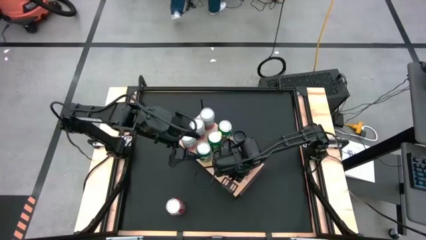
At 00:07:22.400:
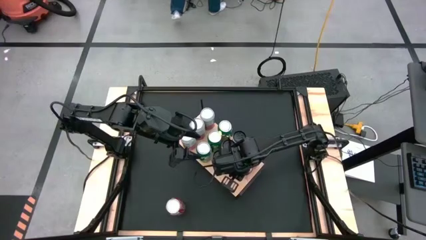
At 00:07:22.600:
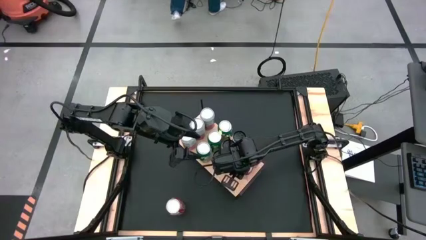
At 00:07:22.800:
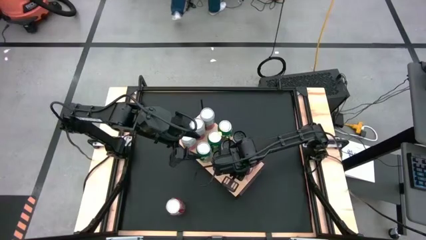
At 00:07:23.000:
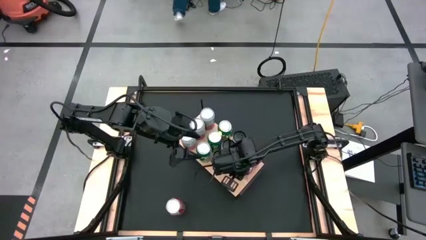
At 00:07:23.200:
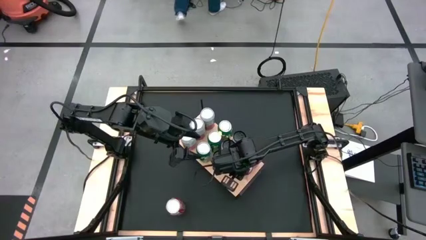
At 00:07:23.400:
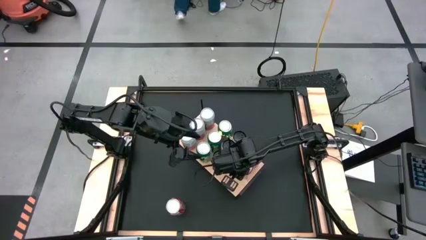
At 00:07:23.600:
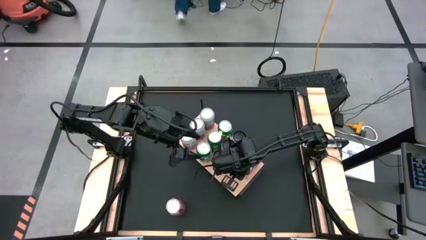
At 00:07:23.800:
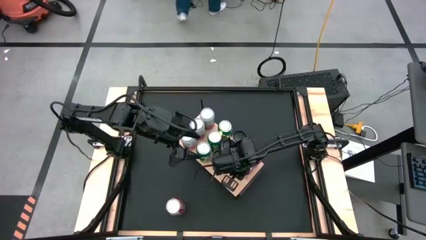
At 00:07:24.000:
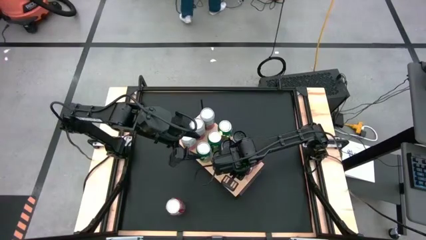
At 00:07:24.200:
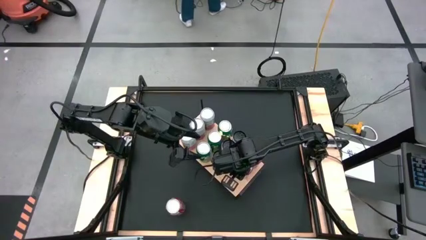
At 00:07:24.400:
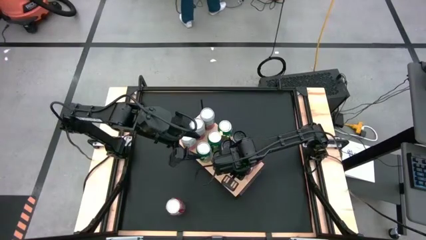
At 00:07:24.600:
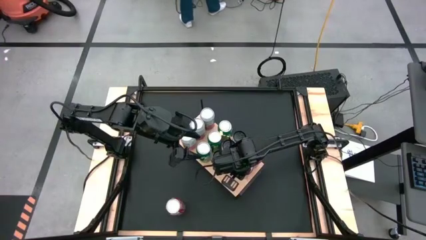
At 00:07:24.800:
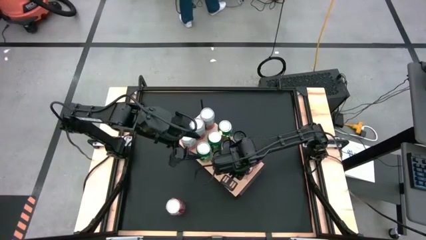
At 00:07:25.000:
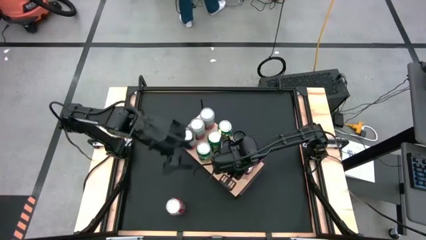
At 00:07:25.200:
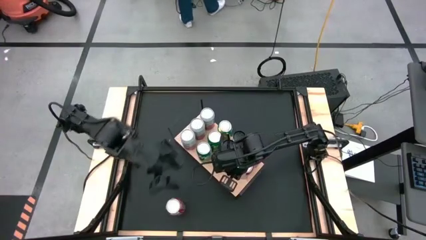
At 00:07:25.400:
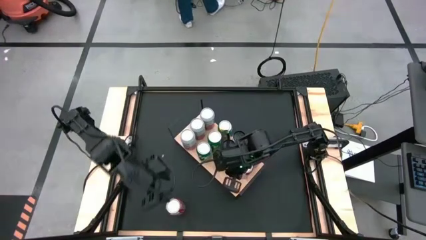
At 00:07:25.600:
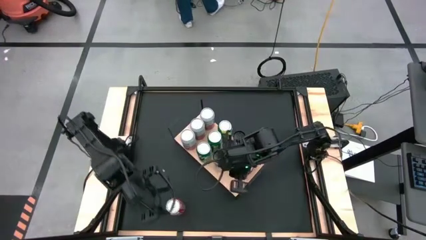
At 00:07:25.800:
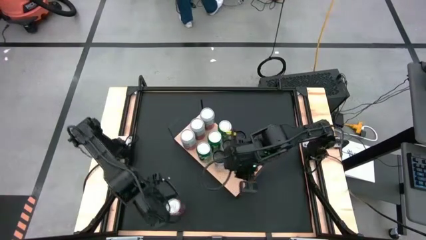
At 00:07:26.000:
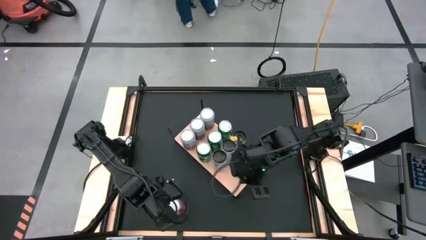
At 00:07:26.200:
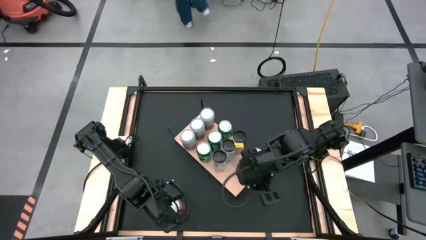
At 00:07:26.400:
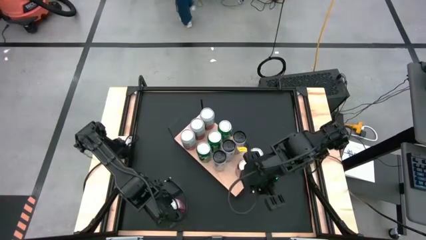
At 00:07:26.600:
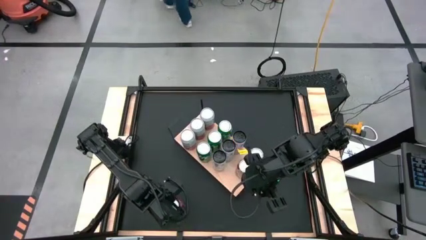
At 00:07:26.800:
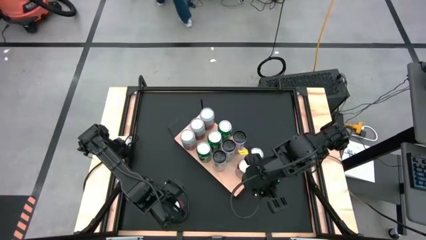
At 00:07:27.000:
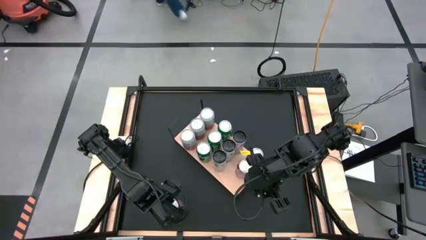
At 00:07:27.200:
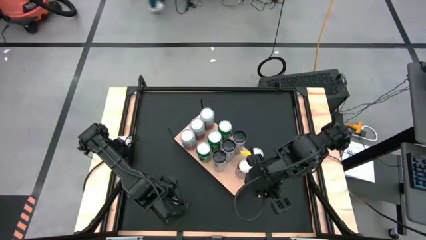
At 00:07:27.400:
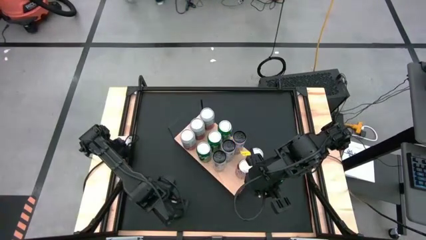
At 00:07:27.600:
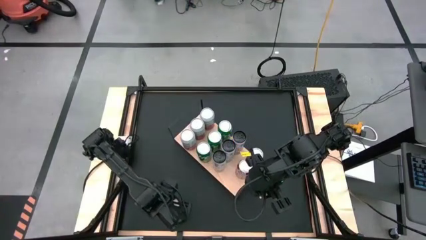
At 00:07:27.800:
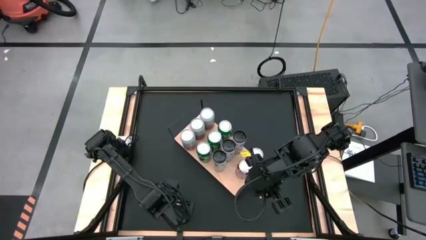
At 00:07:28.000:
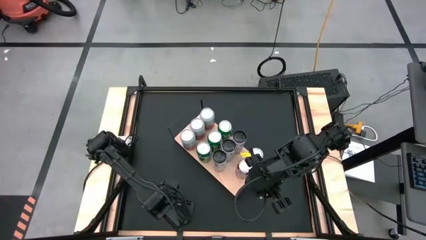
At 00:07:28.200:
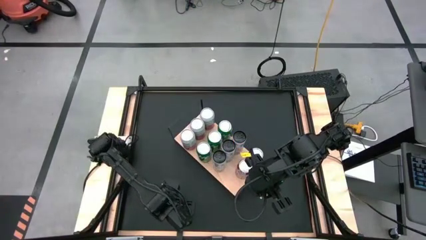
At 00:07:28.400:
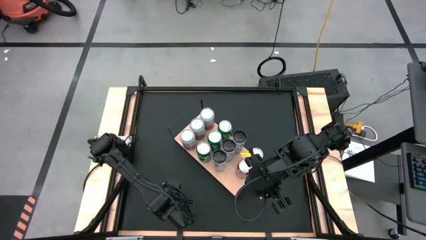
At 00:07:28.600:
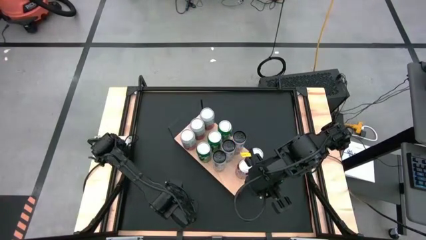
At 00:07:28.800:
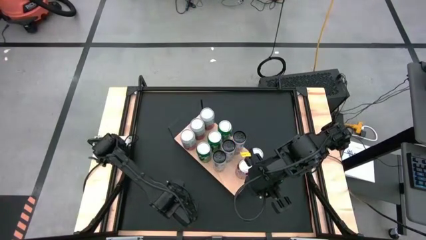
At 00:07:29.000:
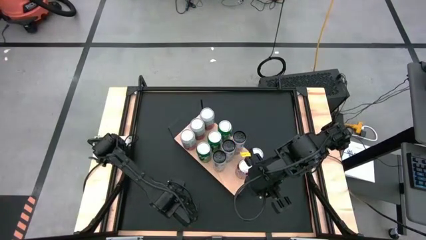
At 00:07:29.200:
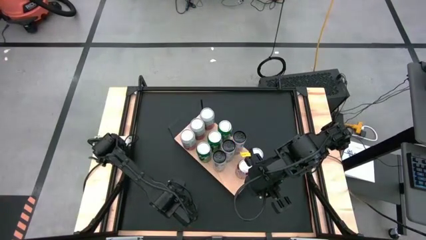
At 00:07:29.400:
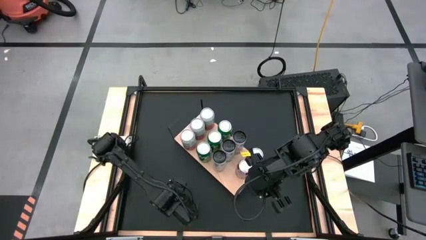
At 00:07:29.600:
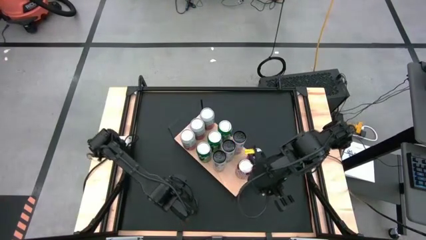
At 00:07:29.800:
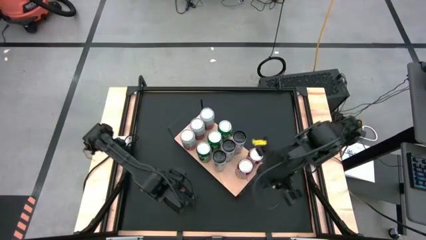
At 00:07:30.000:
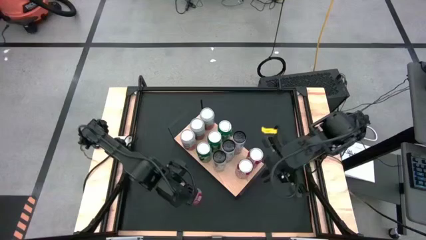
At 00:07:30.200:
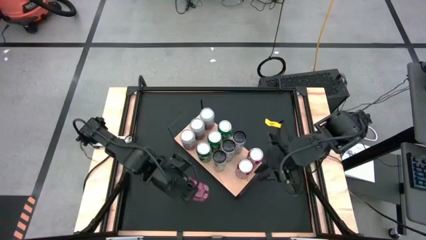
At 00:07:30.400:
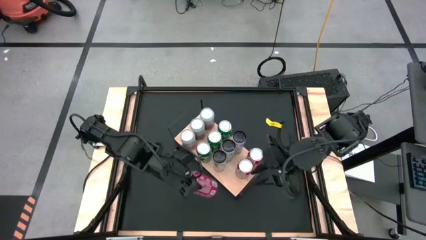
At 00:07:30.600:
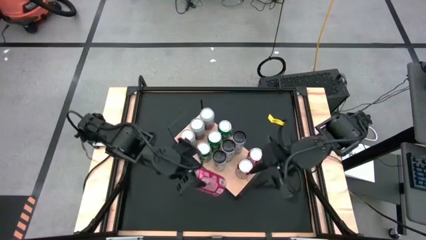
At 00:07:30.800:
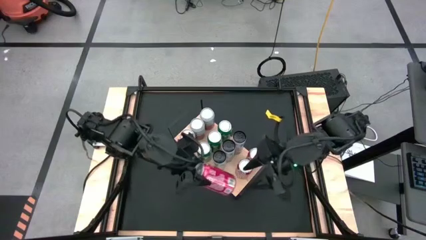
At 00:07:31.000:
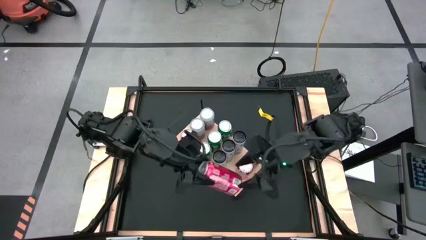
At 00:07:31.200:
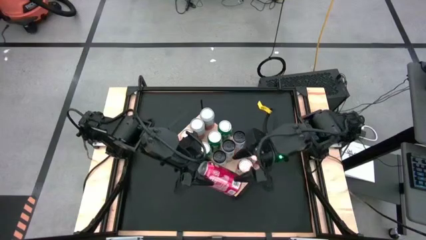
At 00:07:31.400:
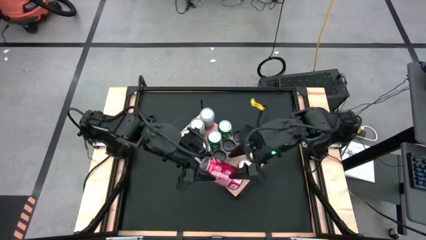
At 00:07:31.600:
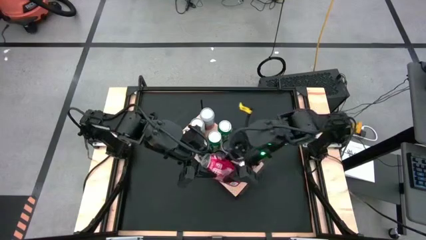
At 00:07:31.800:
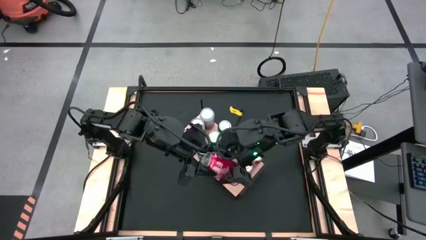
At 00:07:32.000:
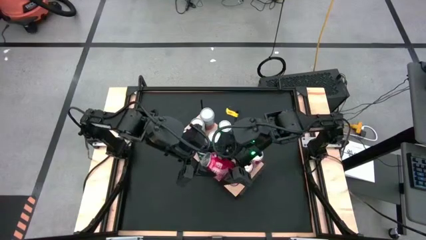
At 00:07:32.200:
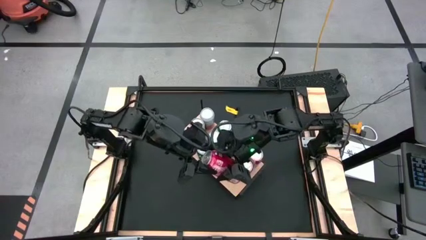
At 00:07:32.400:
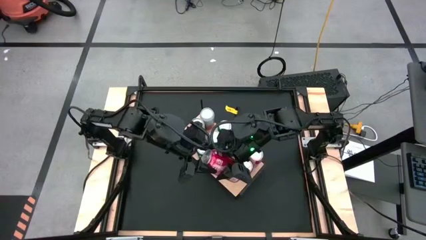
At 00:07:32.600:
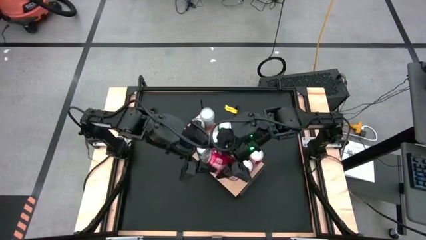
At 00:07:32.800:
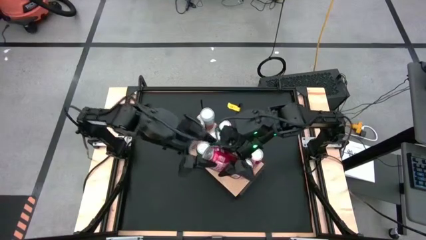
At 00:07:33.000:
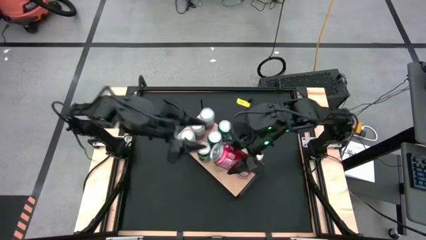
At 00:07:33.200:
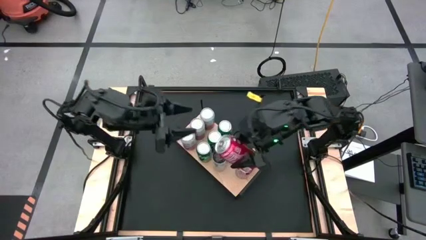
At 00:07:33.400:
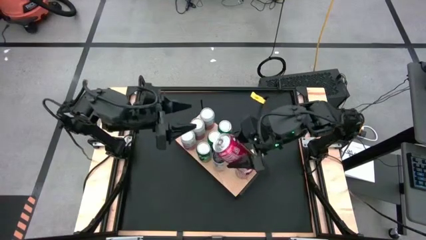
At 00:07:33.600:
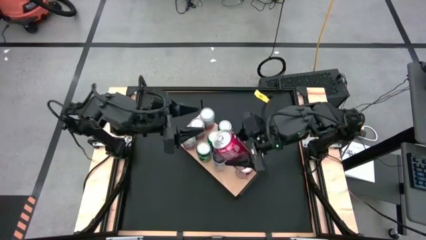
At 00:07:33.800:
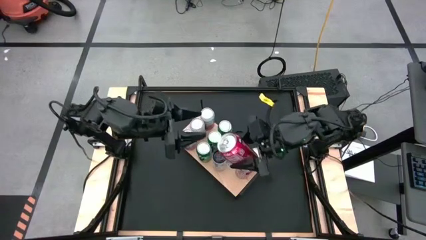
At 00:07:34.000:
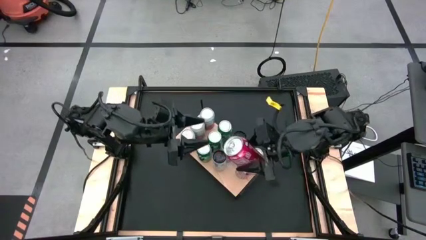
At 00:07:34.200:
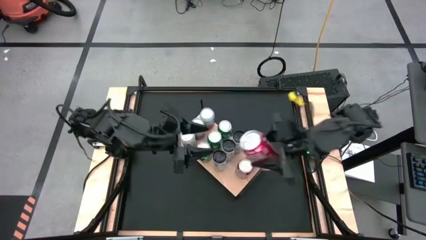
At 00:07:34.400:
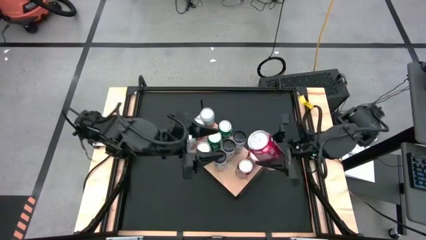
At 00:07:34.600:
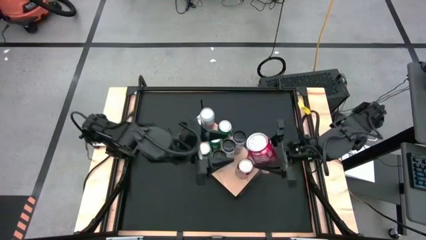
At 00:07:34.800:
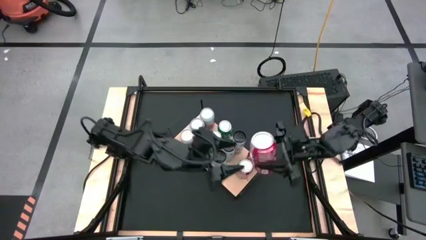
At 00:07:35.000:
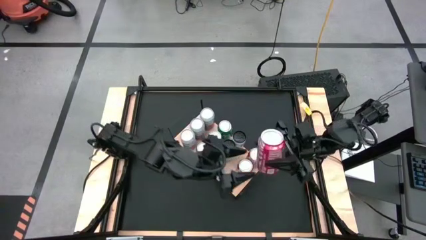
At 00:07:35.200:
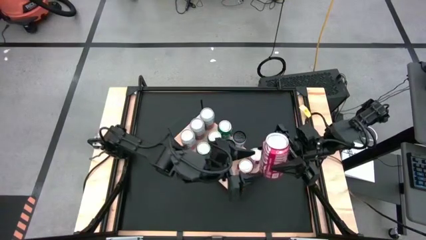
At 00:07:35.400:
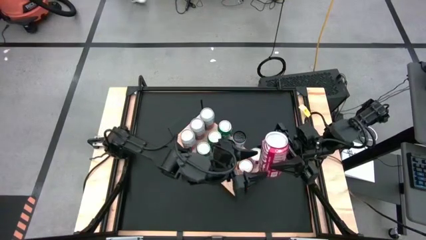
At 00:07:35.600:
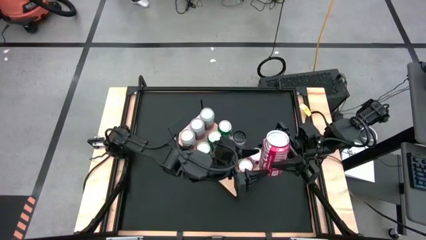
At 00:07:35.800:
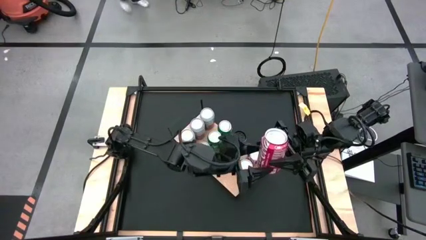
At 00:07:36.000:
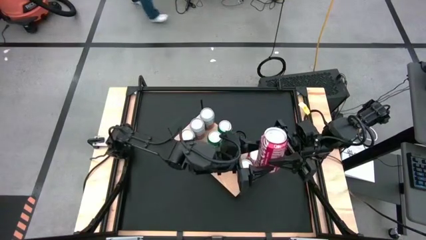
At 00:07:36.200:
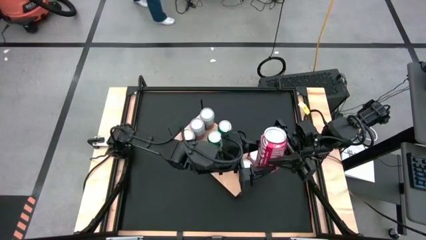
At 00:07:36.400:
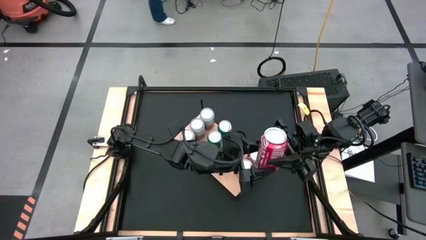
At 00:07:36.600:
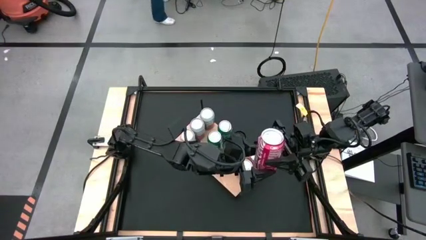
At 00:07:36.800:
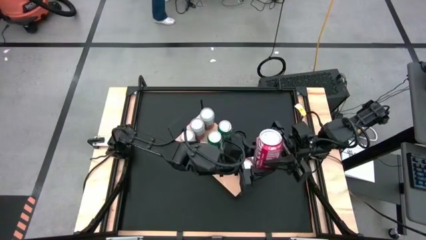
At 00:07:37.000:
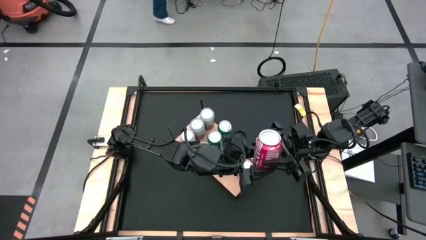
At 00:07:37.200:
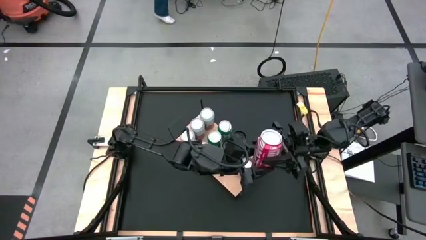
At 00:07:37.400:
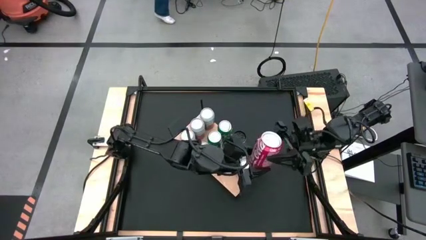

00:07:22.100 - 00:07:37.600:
Task: Place canned beverage on shelf
Put the red soda can aligned with the other red soda cans
